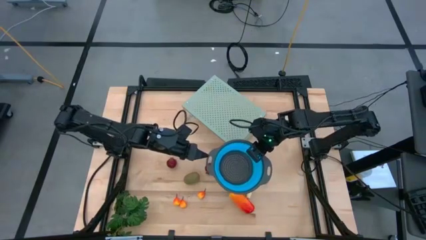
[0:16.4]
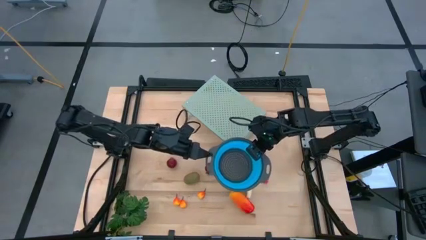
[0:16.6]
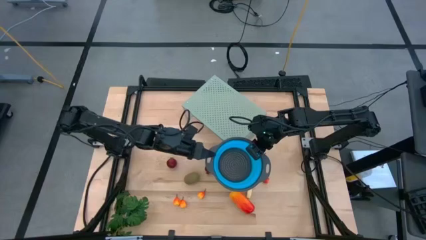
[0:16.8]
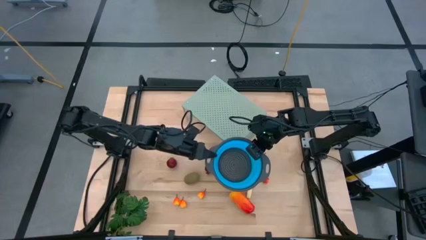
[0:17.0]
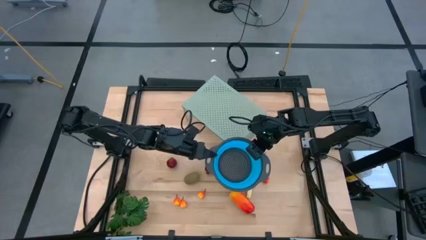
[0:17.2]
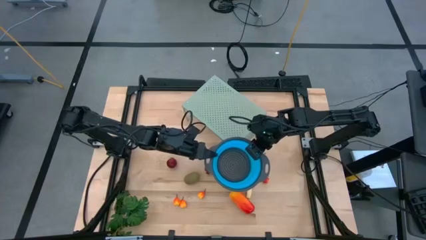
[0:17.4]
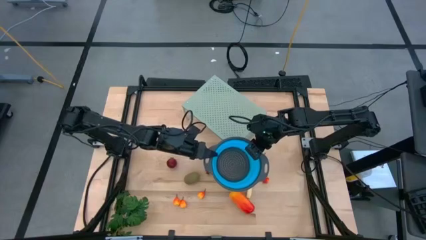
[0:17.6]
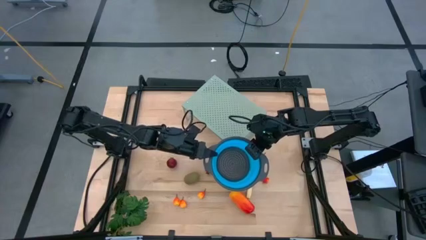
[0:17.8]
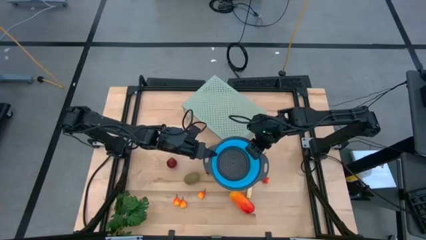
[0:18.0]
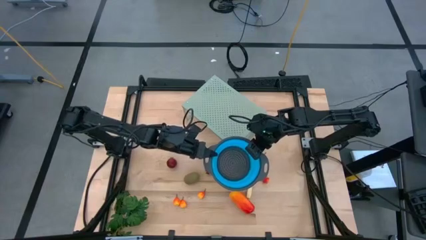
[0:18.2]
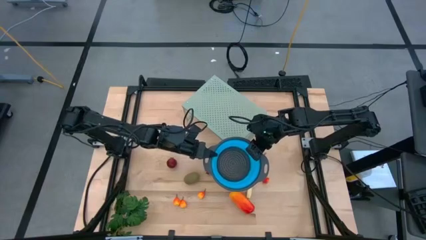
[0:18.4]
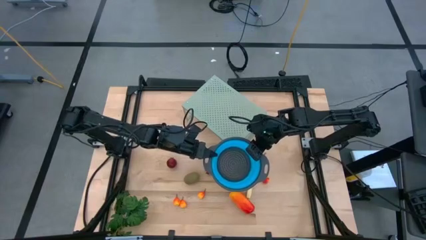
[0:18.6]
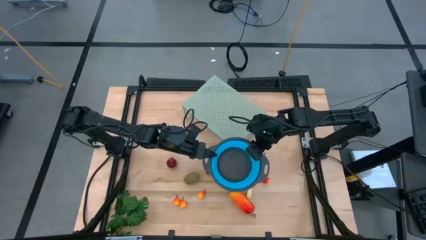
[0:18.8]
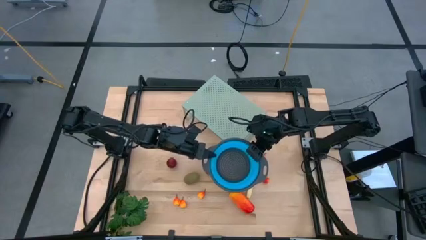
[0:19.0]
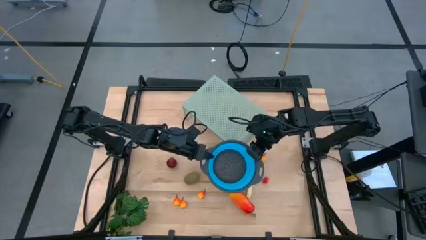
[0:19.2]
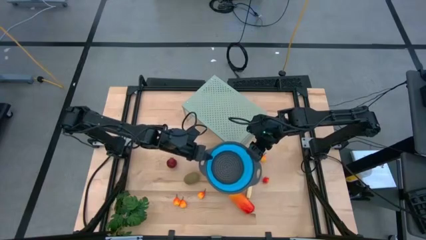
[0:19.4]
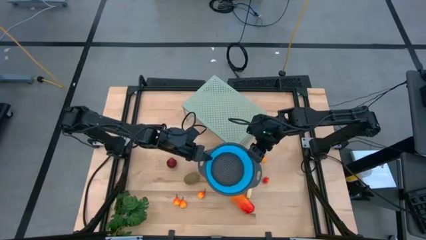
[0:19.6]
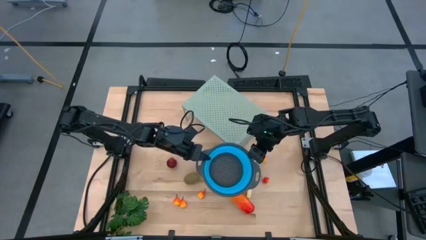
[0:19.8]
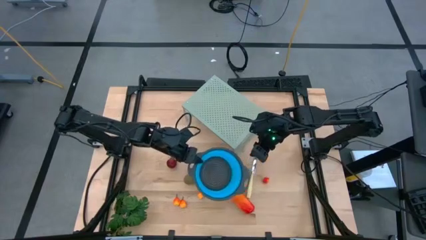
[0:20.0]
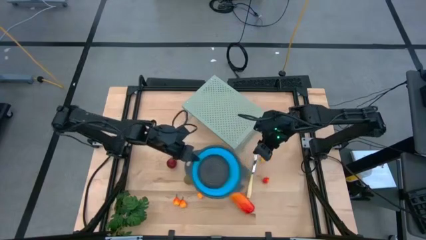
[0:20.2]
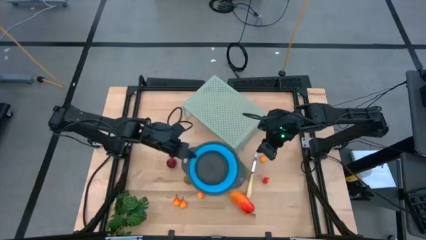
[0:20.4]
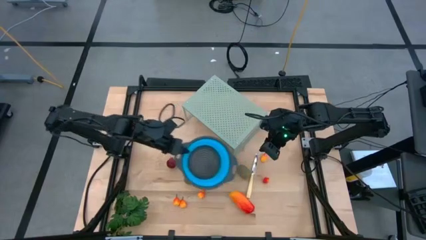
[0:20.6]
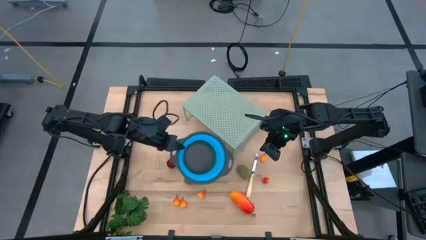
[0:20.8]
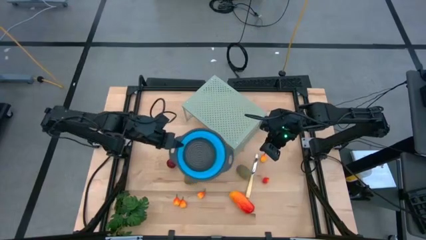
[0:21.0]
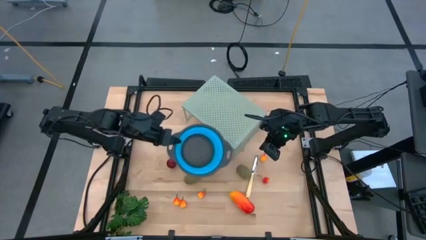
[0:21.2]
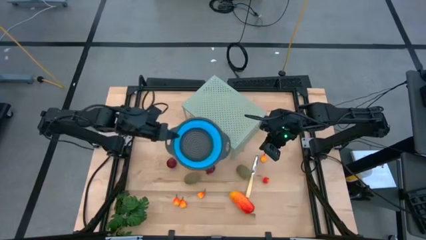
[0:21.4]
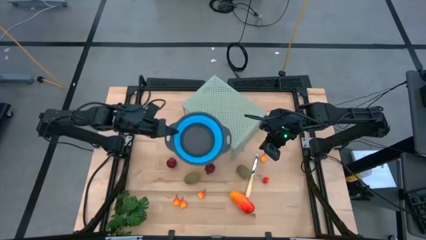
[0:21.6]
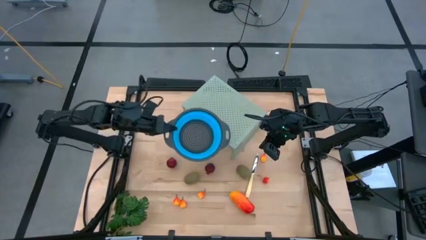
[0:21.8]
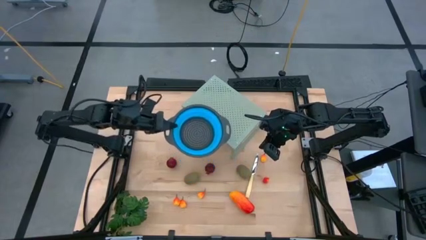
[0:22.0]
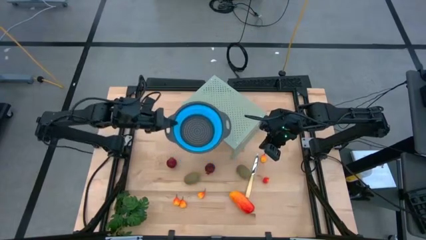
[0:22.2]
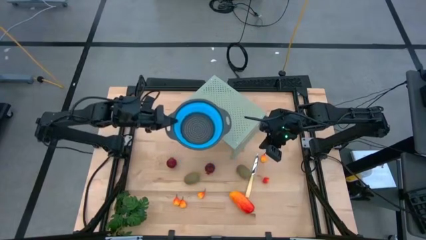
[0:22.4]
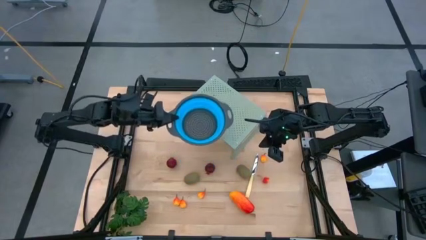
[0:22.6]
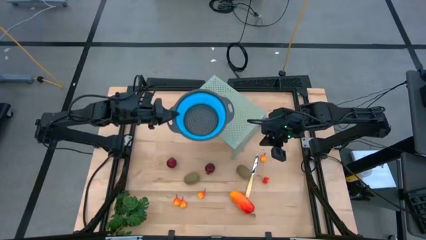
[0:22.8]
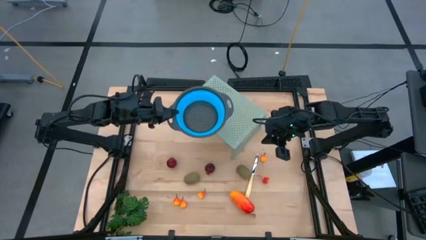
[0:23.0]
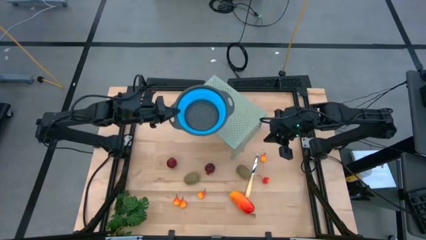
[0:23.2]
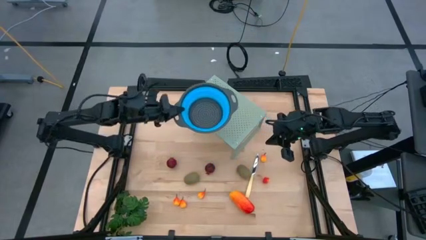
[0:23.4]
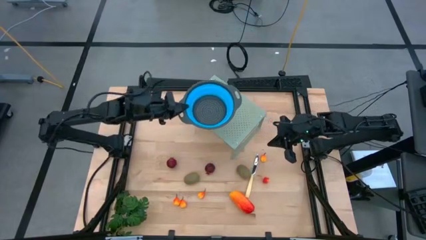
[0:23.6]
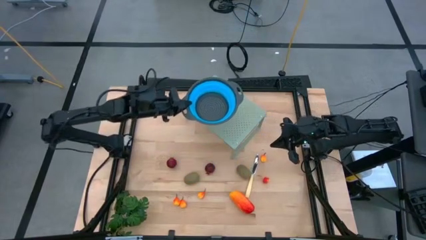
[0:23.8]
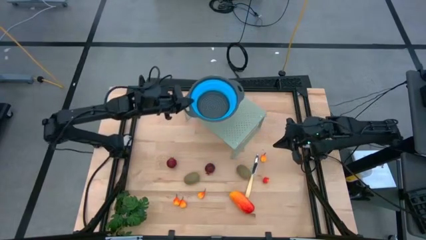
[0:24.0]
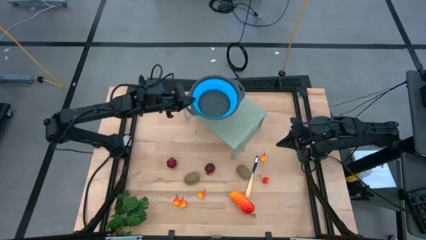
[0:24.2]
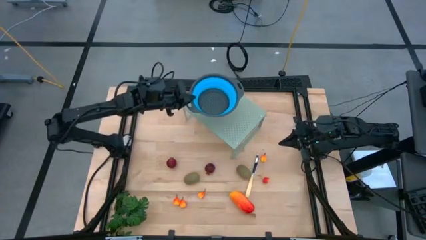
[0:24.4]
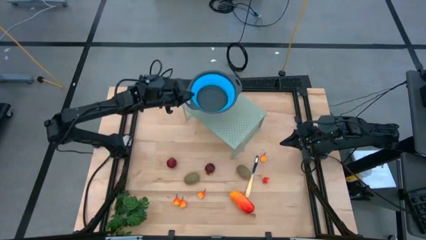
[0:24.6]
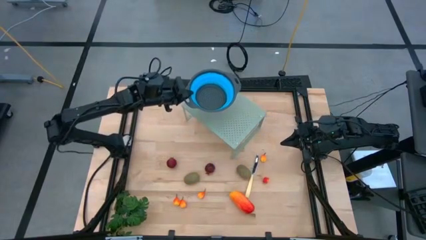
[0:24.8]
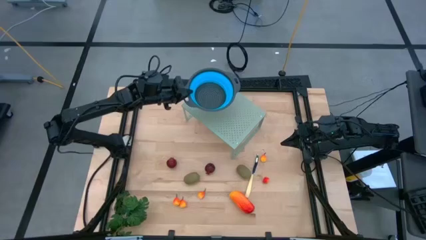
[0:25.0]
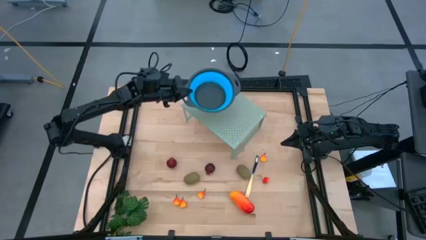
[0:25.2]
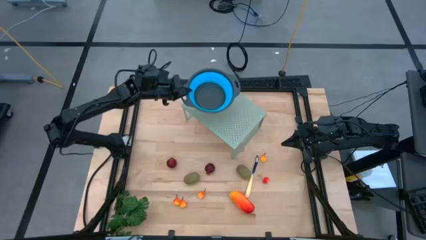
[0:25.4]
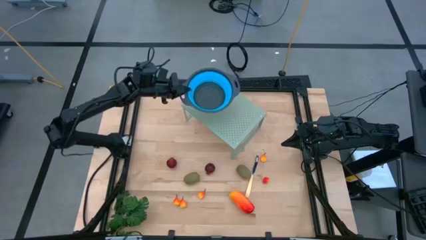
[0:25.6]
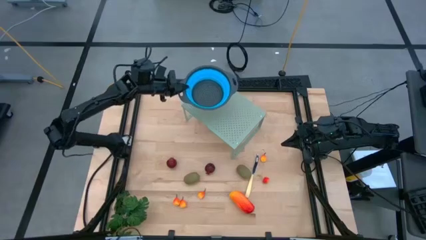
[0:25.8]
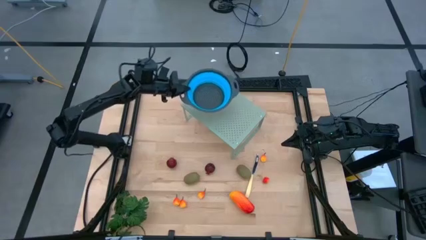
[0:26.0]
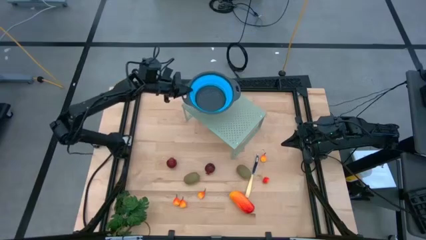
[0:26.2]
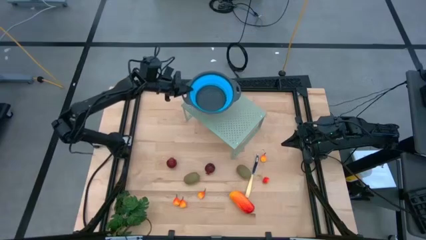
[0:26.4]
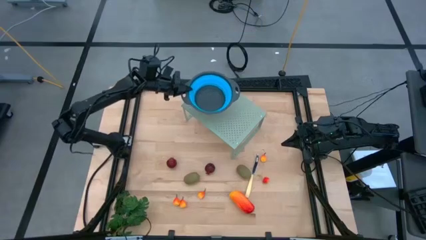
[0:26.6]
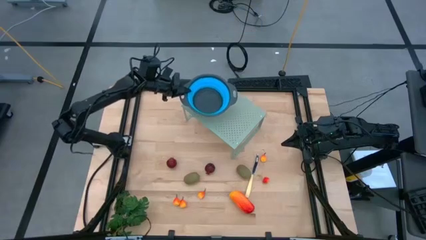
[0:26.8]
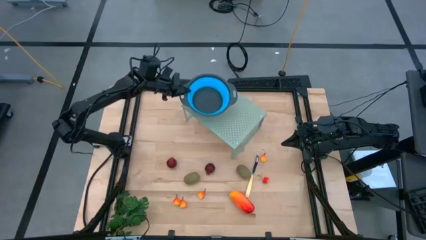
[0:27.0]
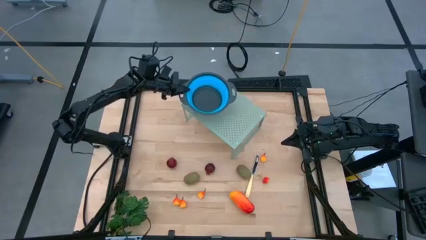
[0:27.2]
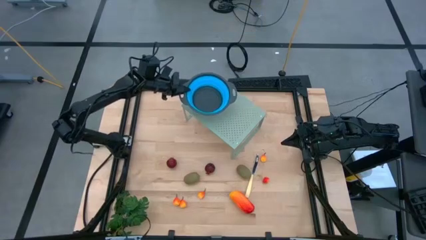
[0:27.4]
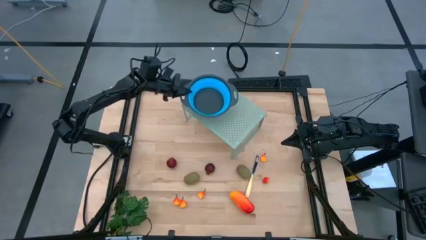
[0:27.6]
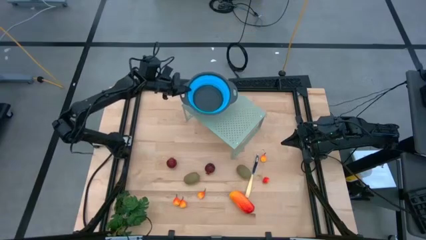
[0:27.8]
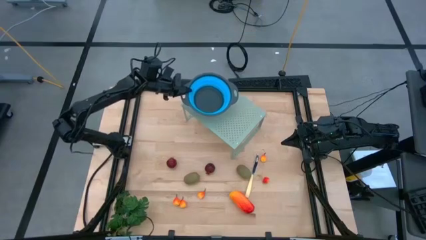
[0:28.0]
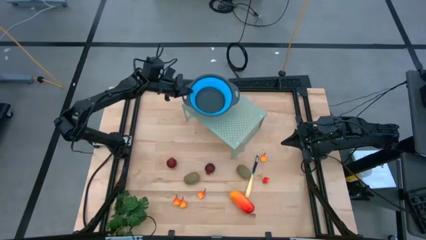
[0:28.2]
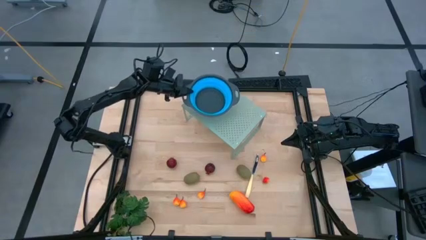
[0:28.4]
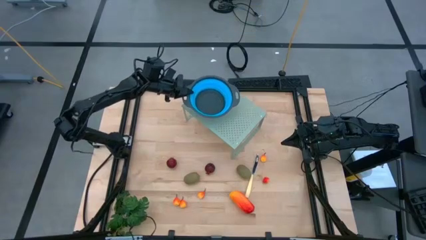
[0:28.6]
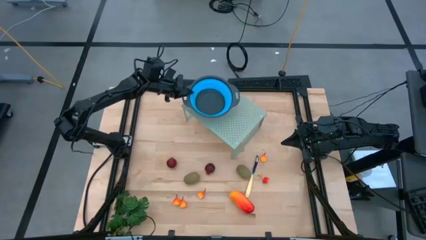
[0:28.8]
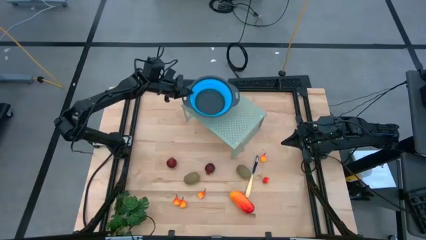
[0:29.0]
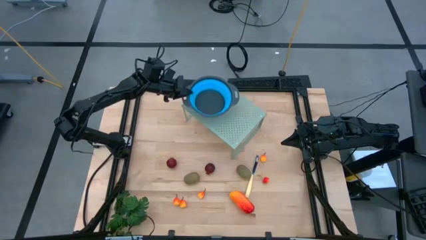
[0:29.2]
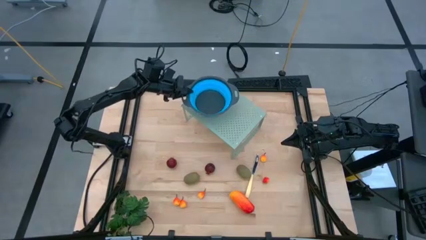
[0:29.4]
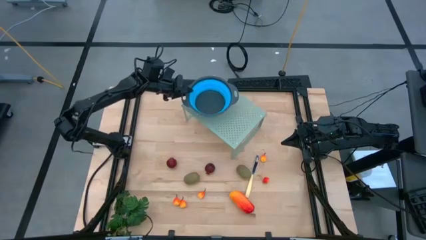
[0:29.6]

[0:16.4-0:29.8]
Task: Pick & Place Fruit
Put the blue strainer bowl on the shelf

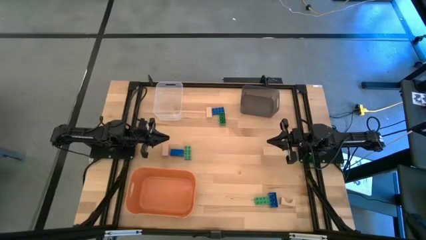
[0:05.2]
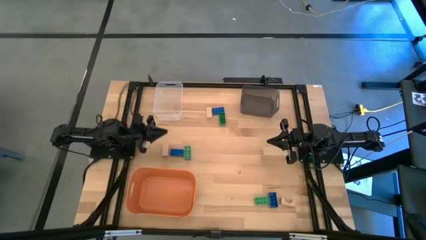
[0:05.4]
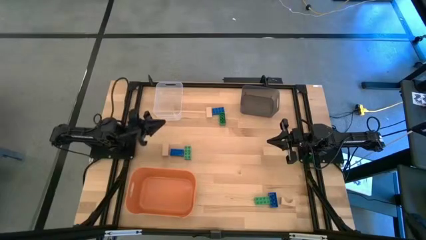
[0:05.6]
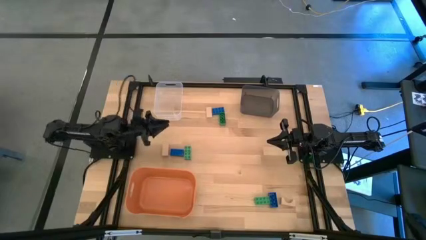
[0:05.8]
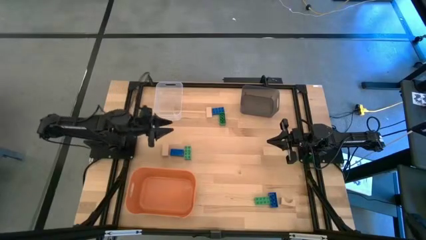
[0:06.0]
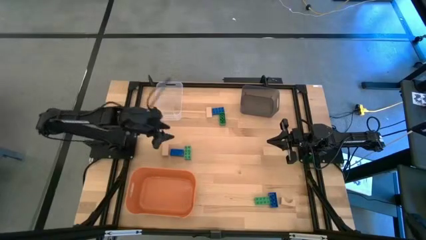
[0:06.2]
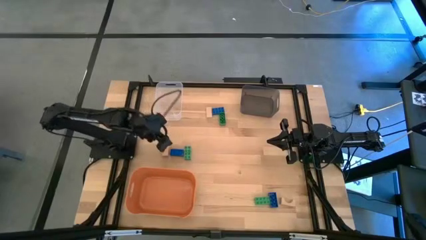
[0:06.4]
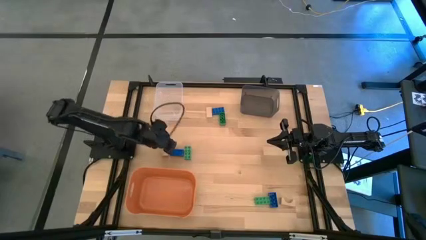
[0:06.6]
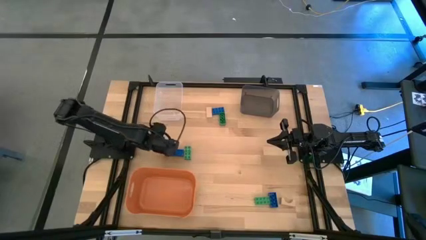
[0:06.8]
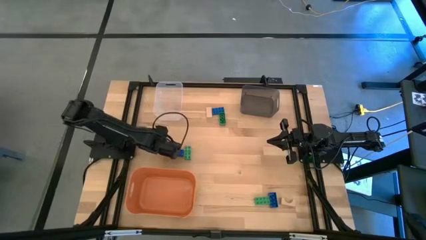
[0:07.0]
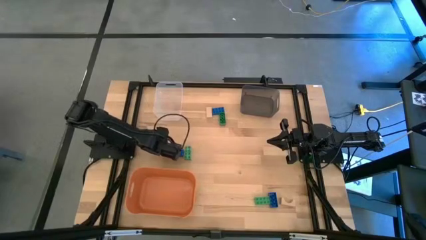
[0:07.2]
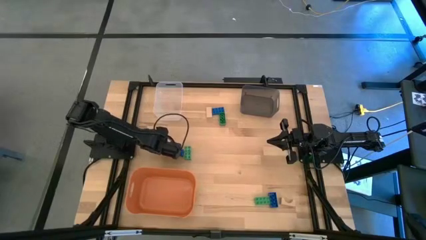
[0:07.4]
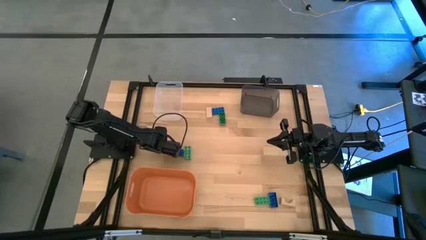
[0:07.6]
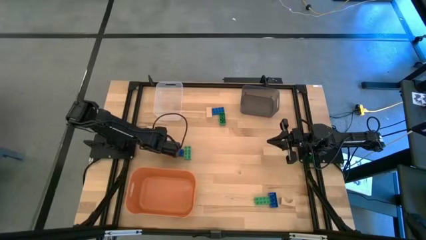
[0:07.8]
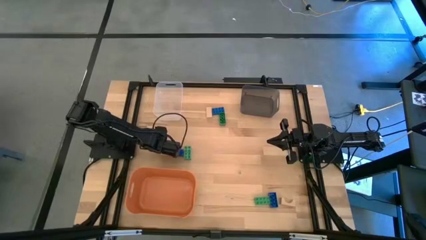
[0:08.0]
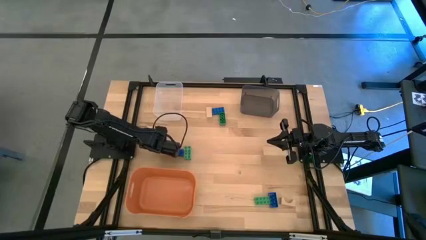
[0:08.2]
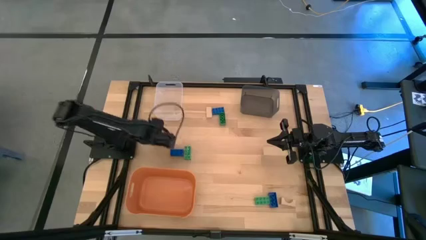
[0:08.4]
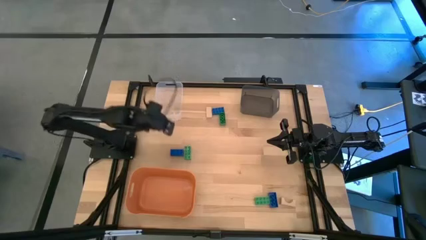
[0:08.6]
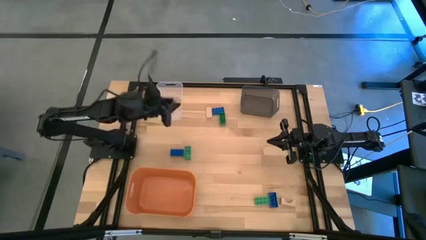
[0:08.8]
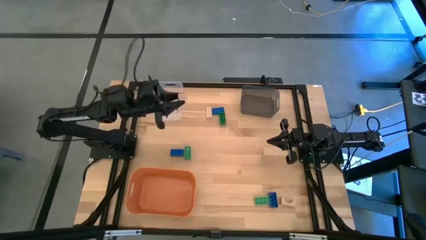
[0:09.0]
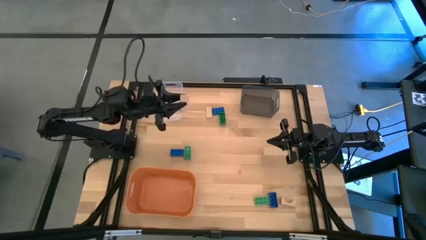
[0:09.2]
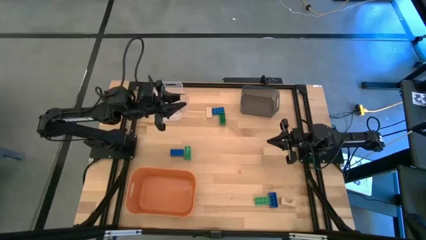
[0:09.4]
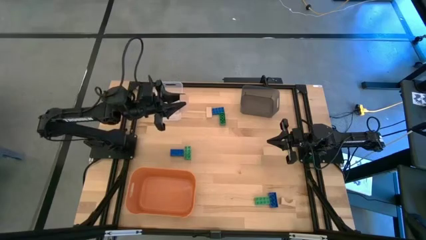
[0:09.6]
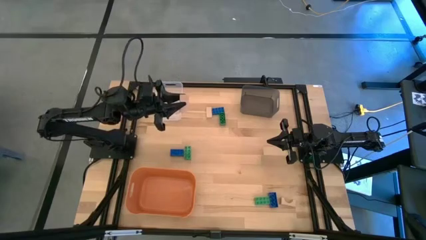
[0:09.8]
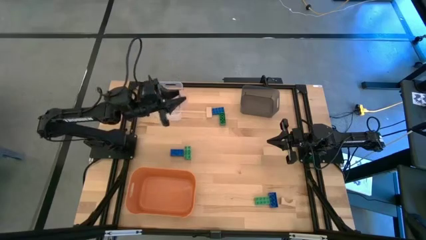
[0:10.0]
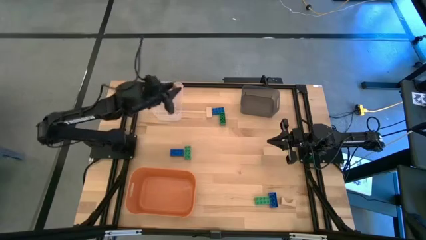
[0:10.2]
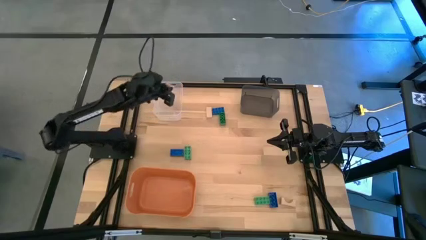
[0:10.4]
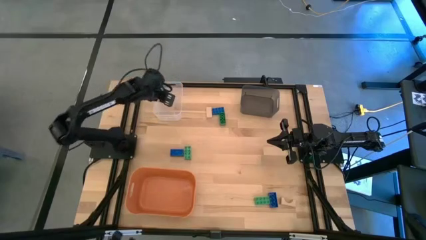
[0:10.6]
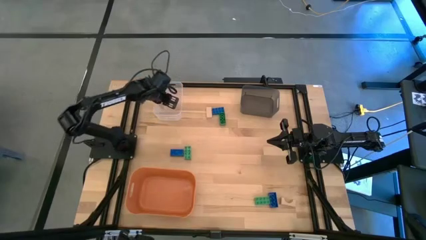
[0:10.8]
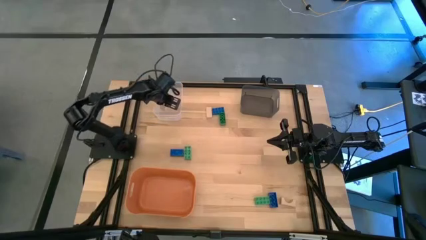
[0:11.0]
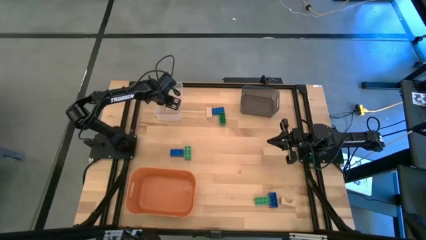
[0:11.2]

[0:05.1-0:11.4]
Task: Sort & place blocks by color
Put the middle brown wooden block into the transparent bin
